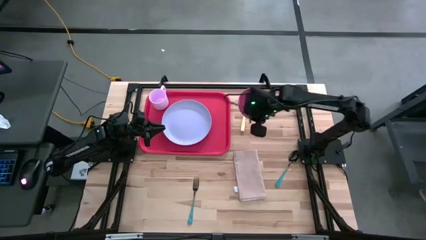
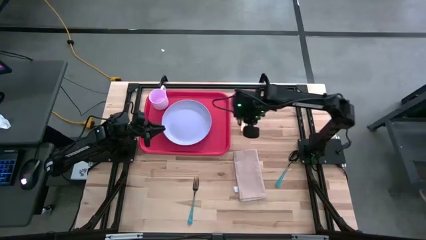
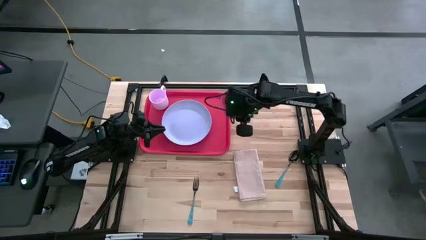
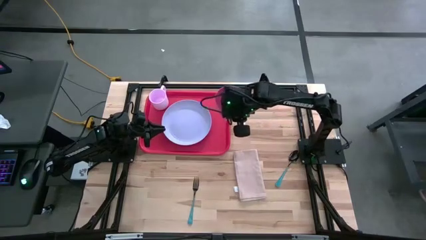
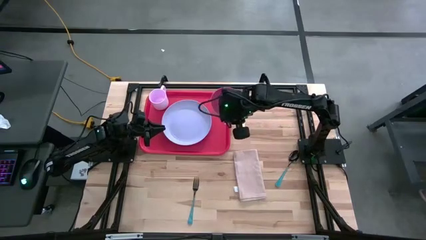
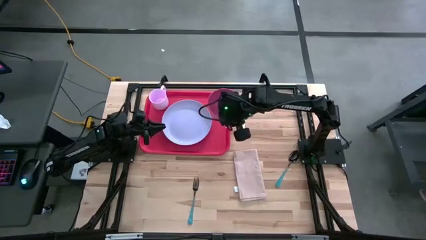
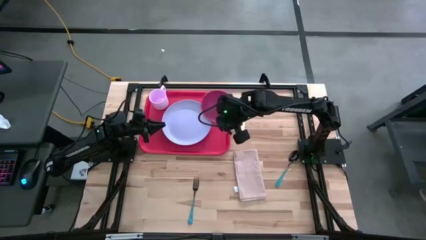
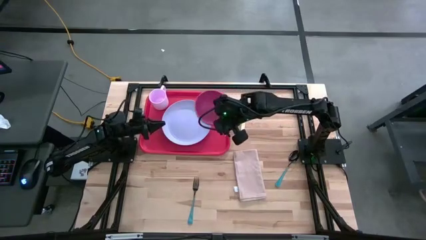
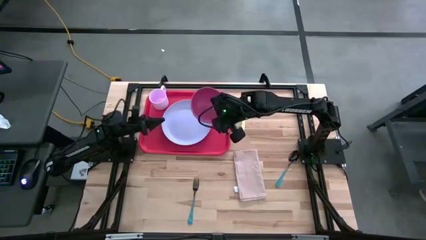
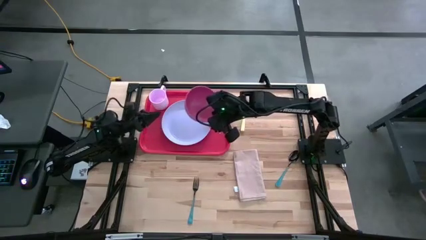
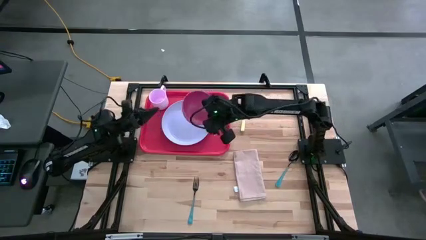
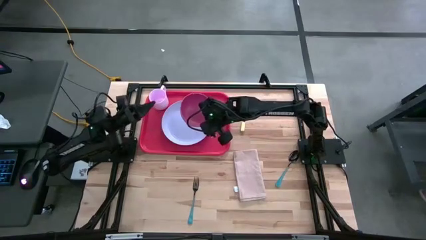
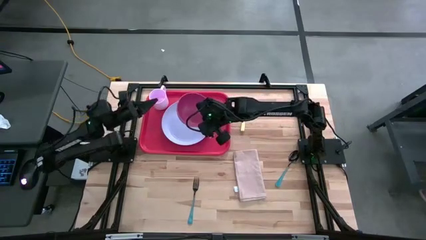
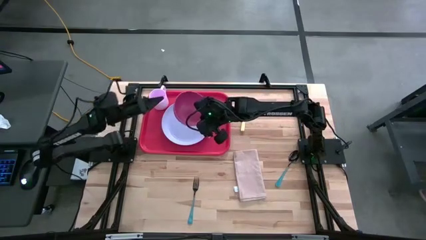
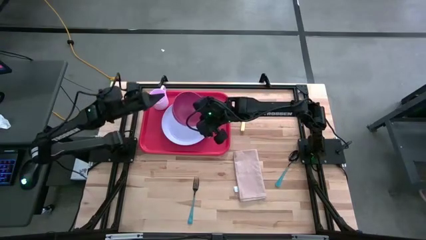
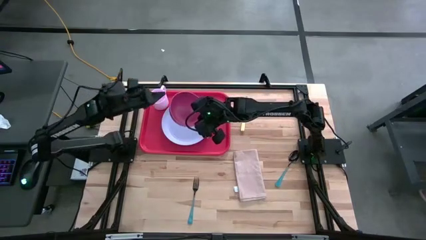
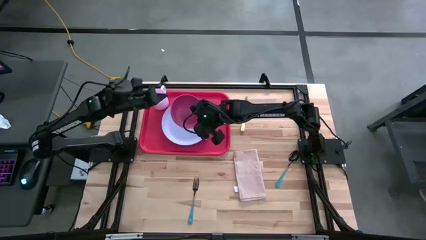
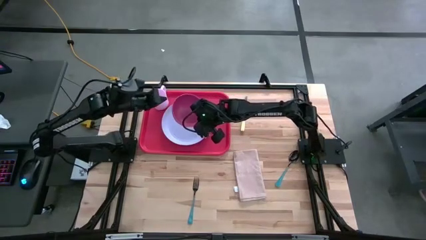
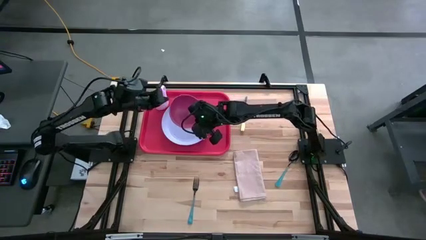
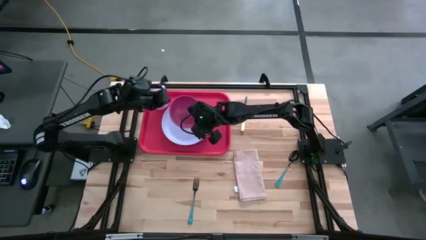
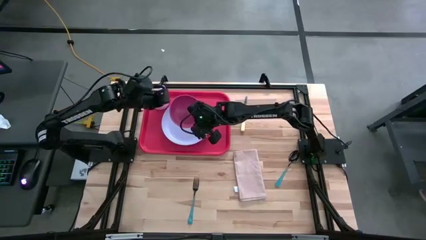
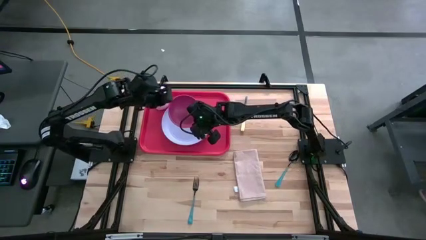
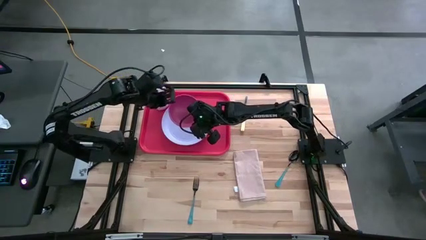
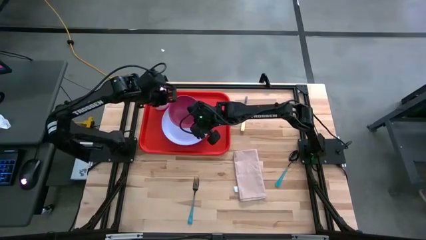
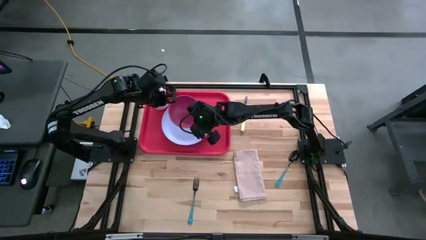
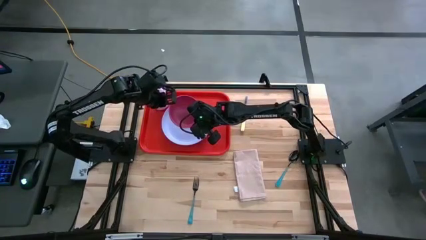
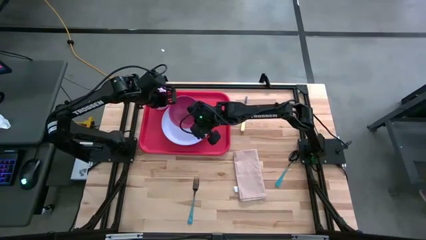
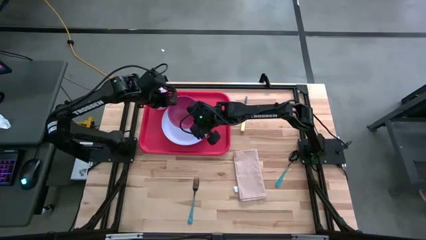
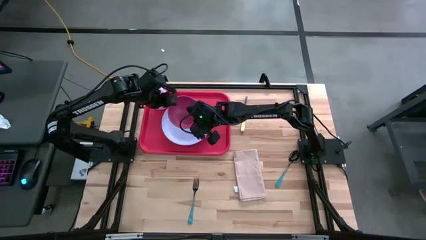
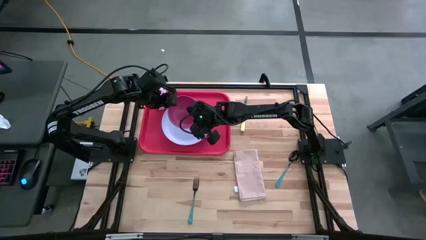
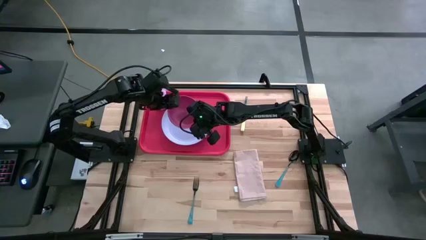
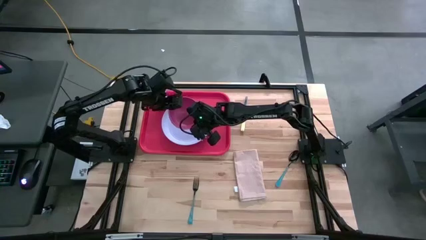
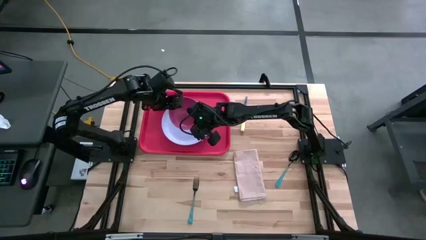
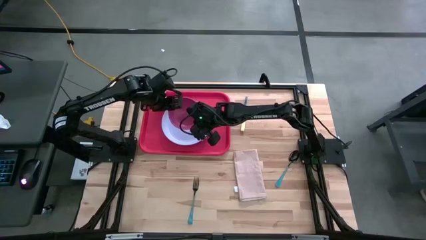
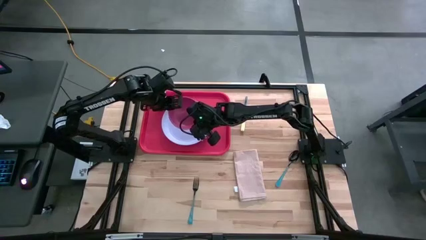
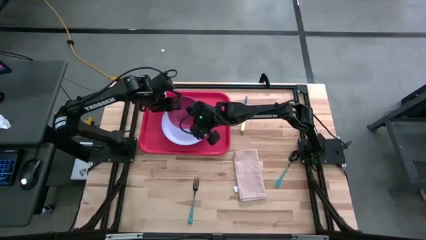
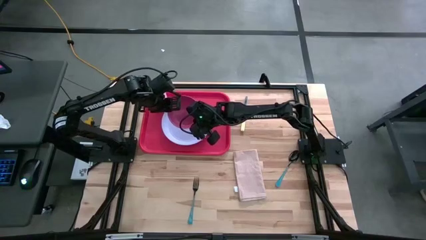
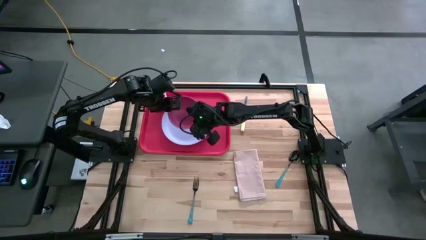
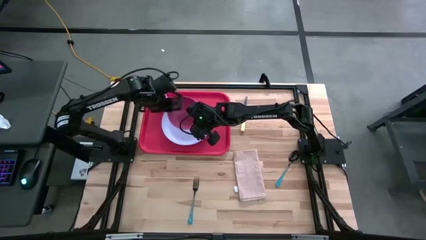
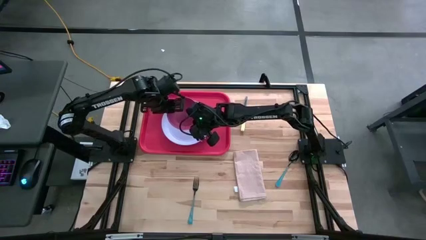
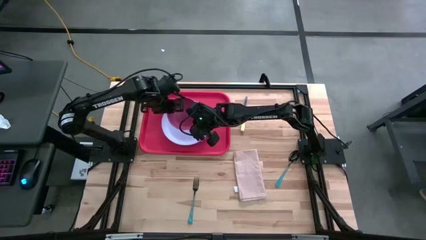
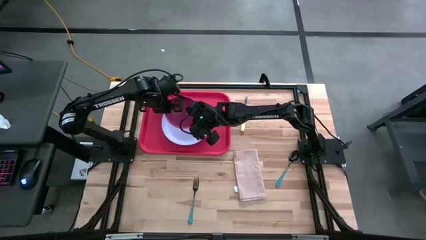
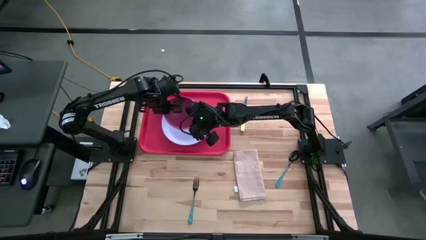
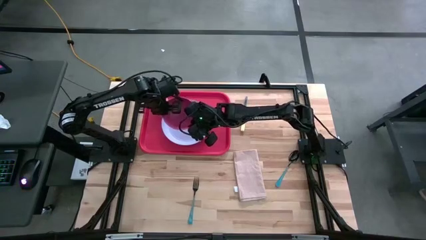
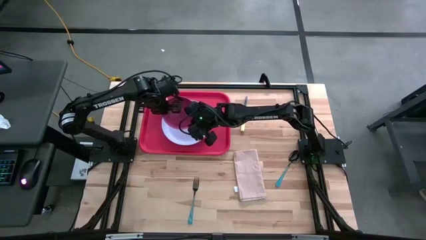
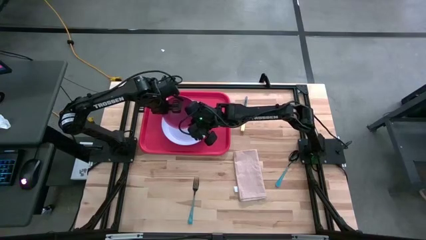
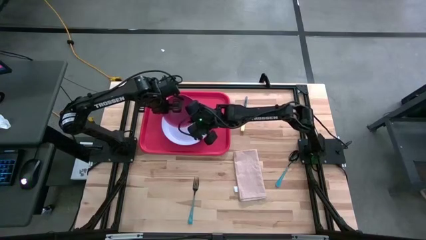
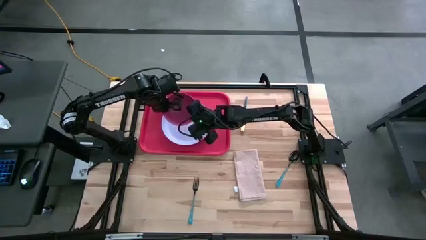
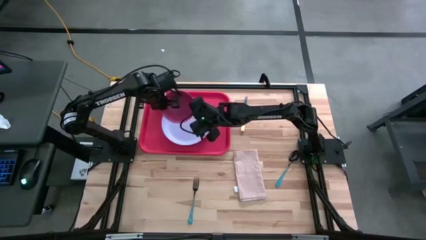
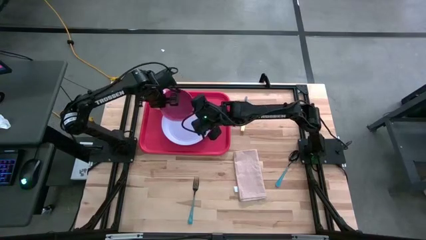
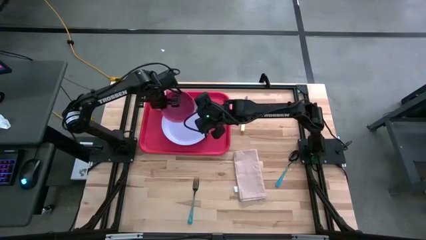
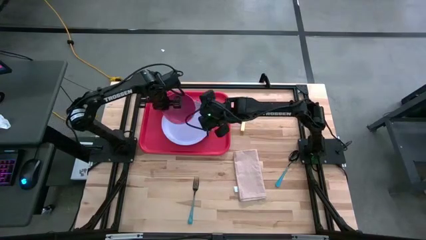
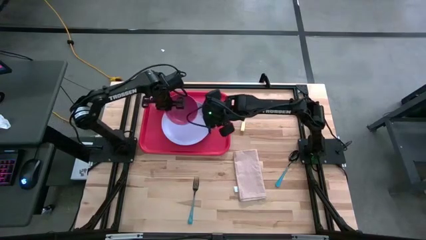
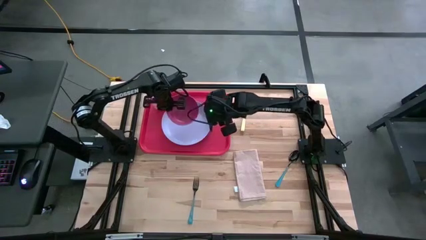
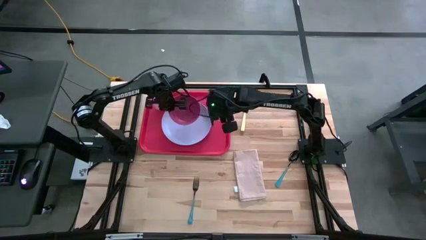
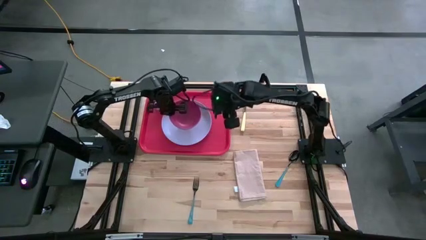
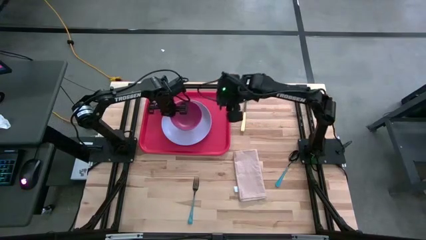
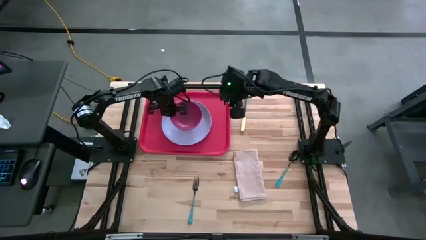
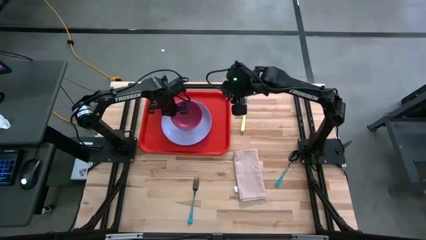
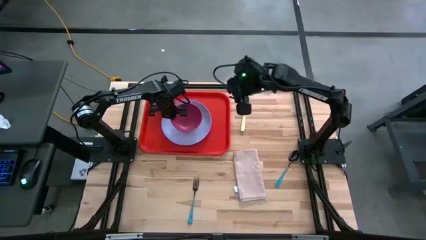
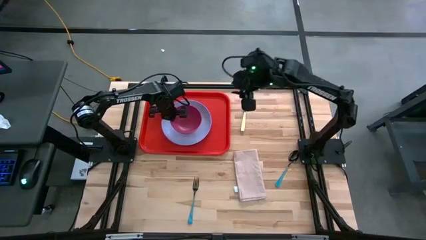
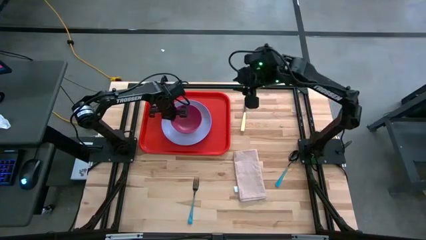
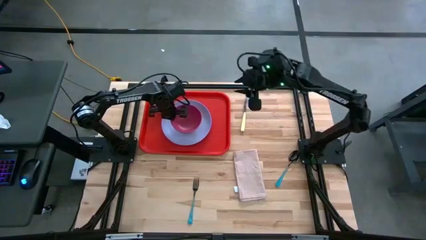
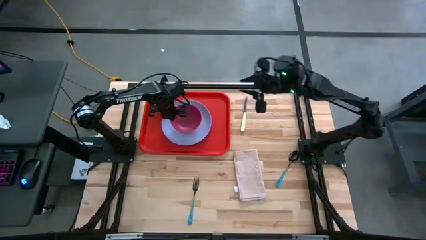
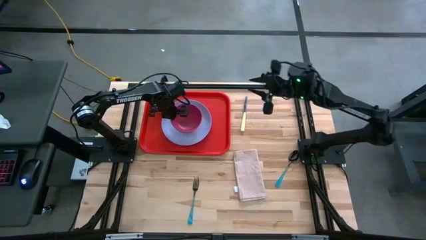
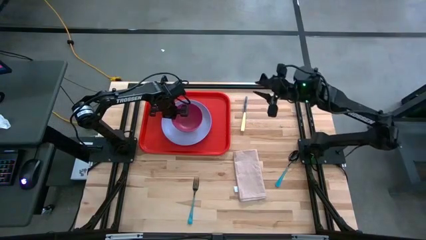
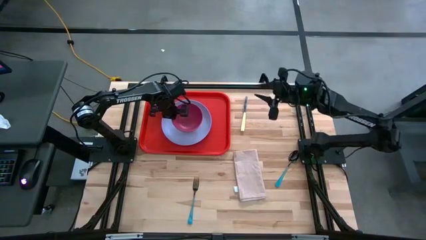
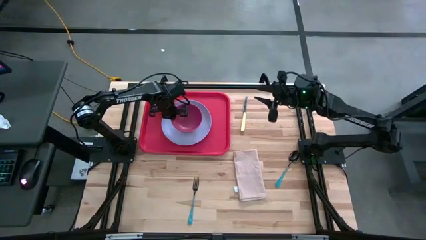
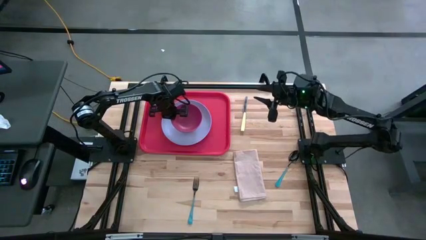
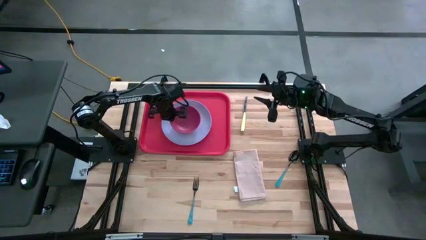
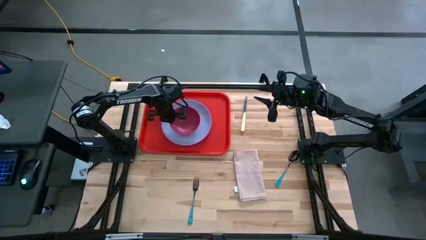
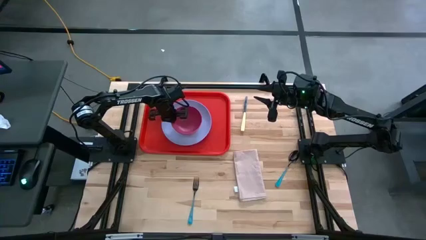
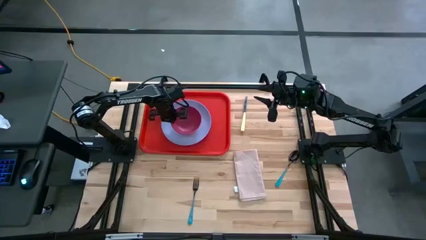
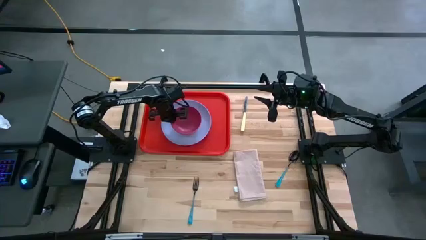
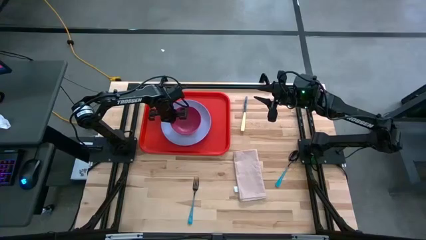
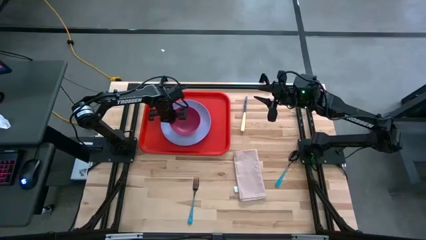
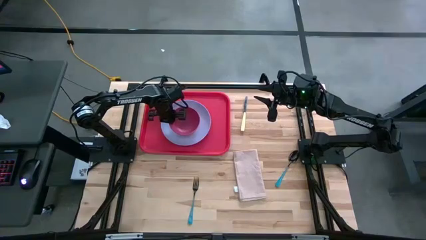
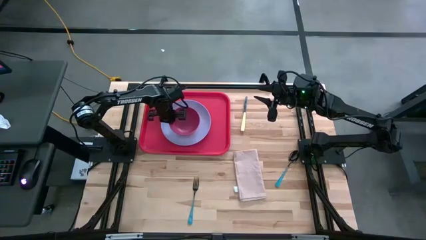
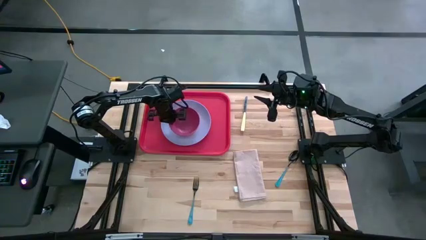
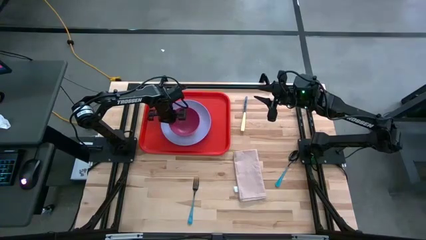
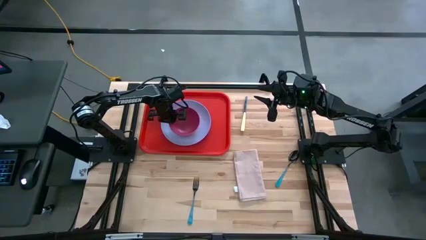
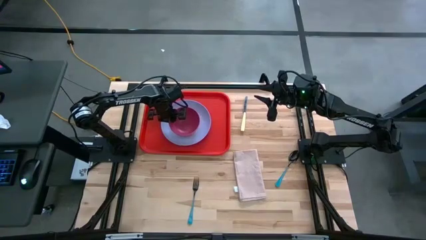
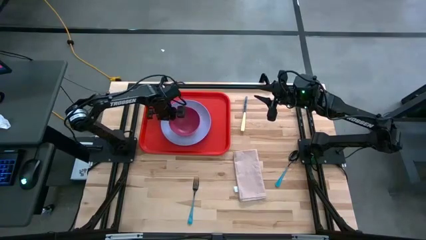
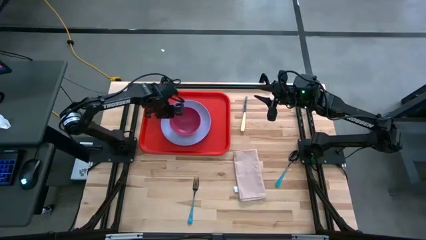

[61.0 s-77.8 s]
Task: Set up tray
Put the pink bowl on the purple plate
